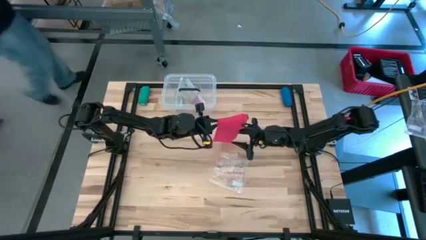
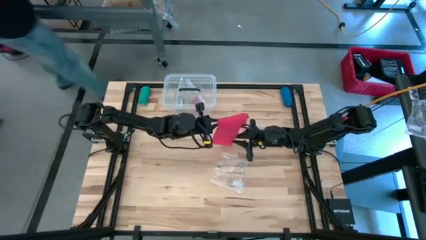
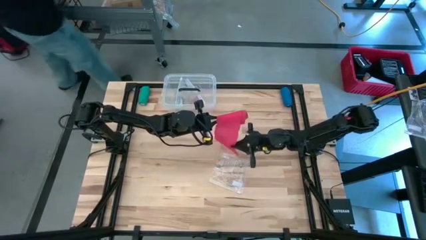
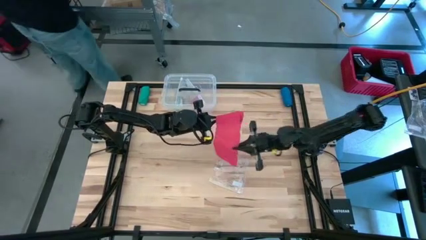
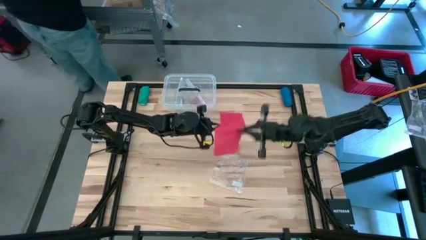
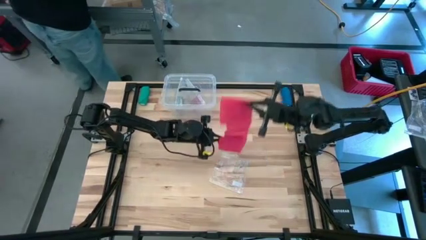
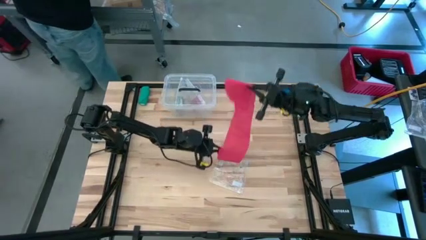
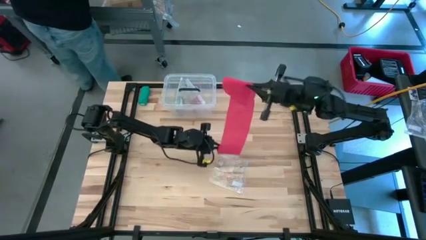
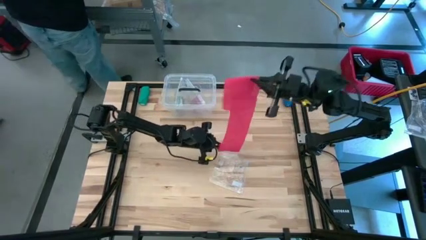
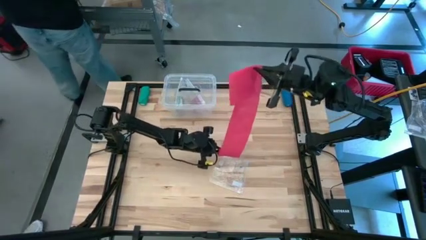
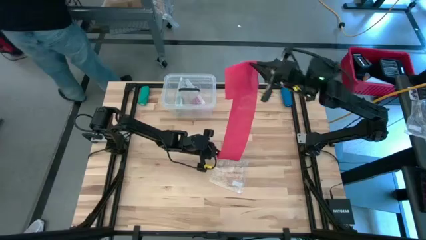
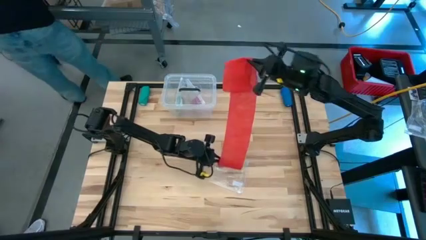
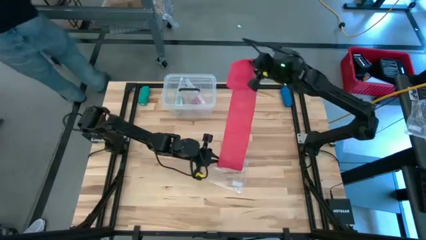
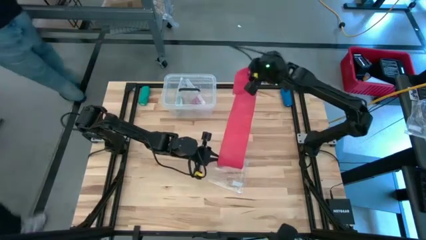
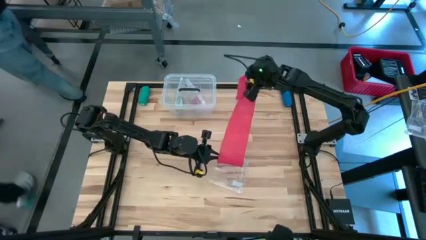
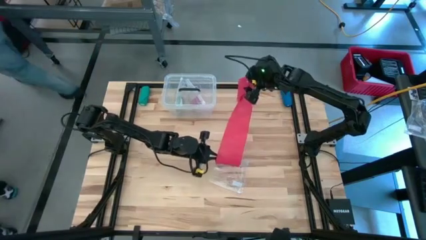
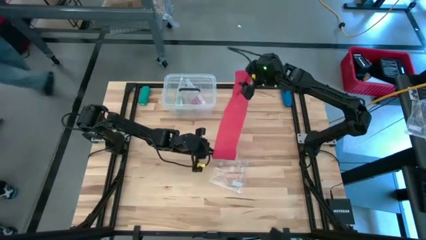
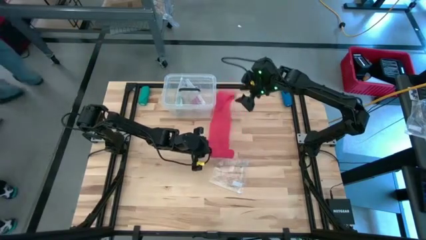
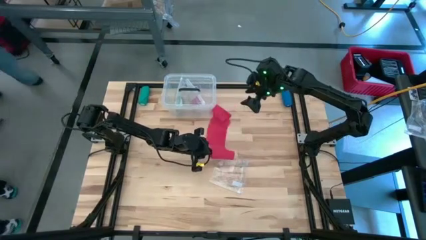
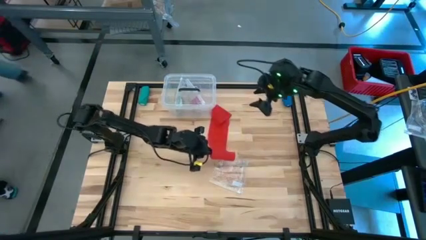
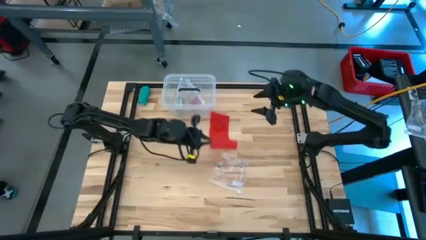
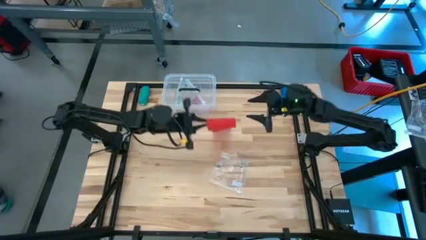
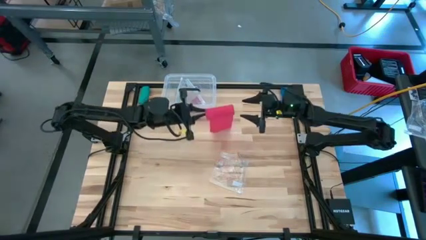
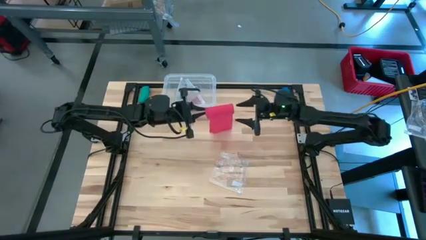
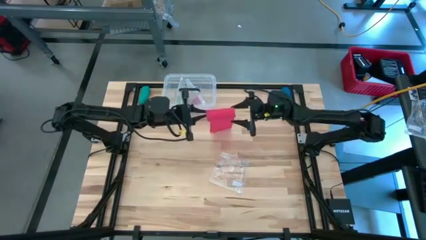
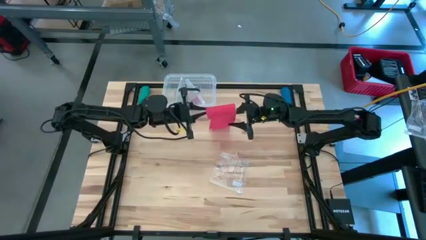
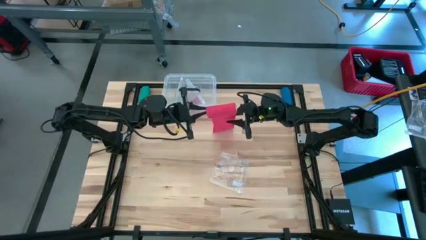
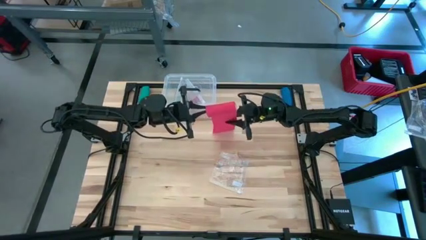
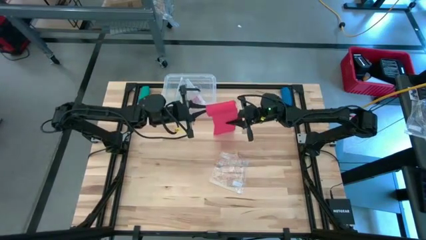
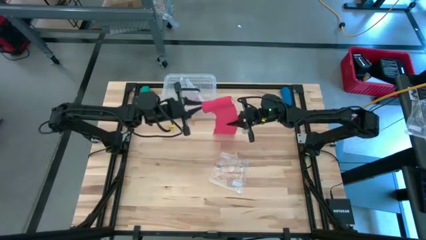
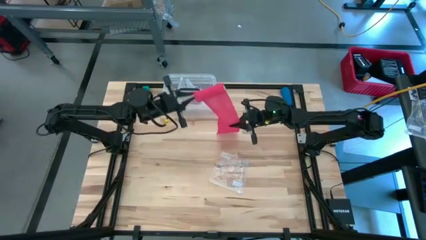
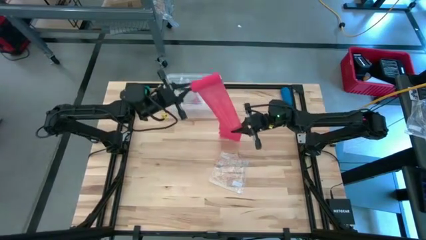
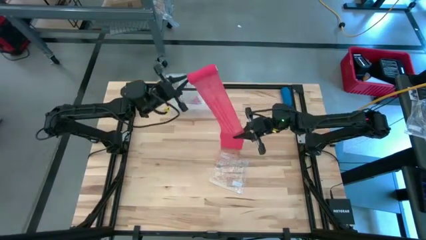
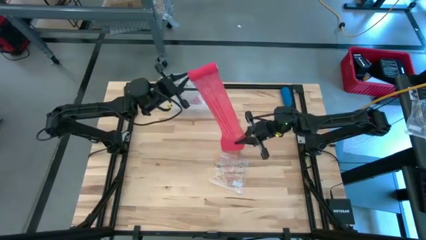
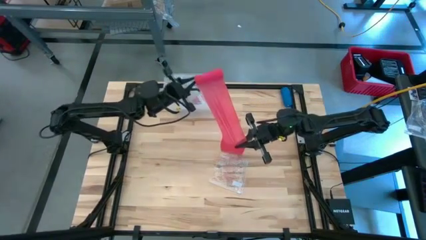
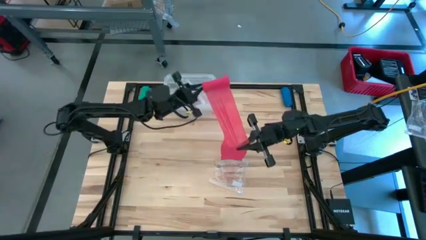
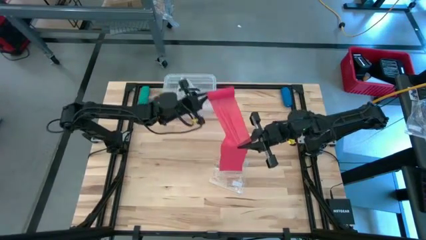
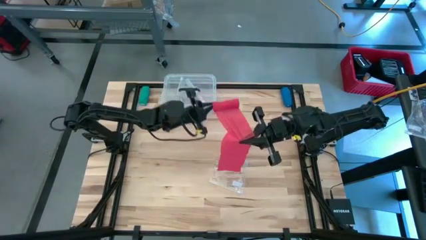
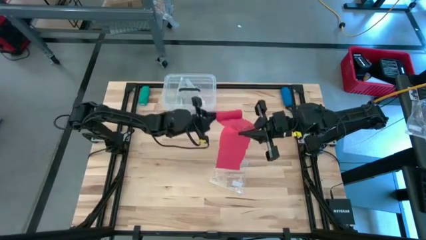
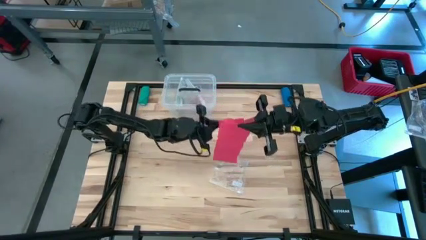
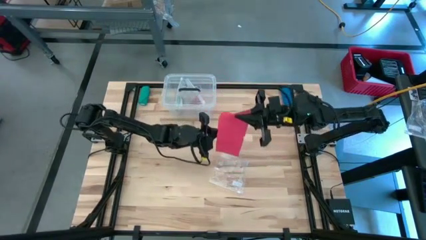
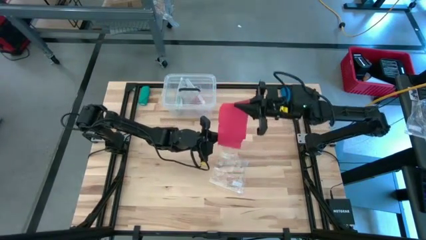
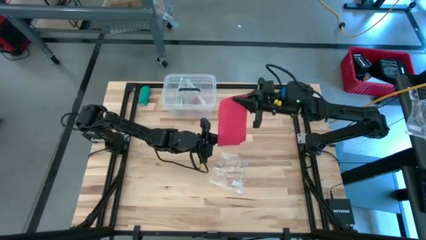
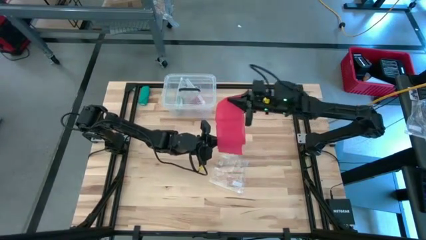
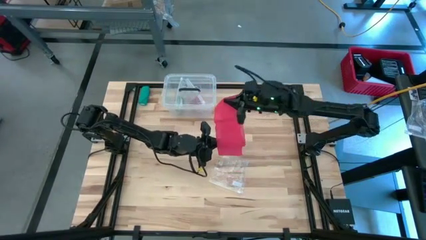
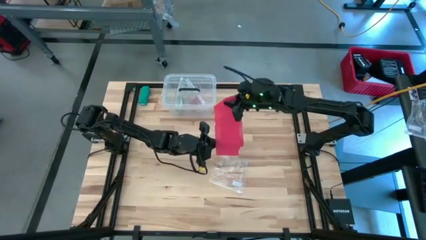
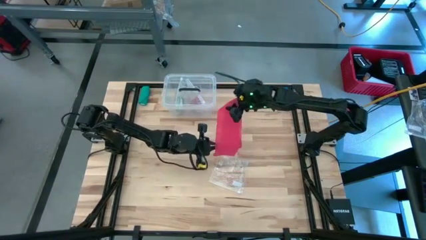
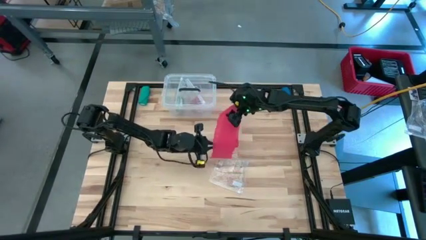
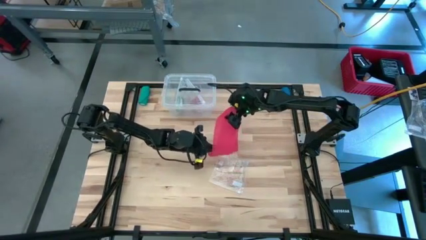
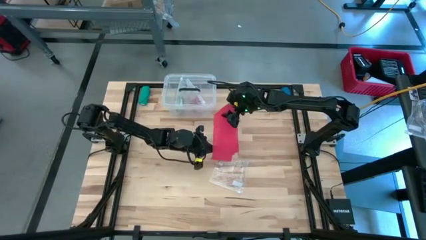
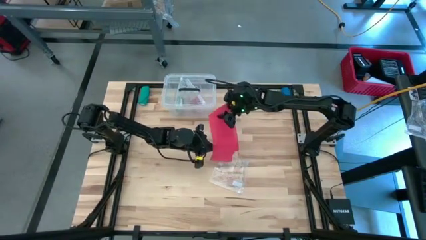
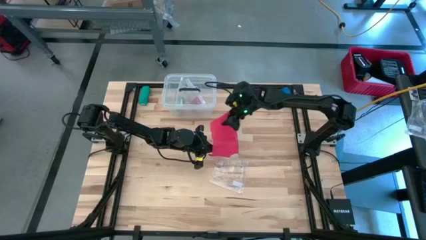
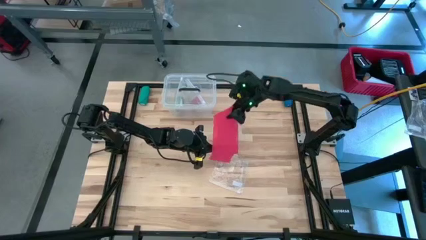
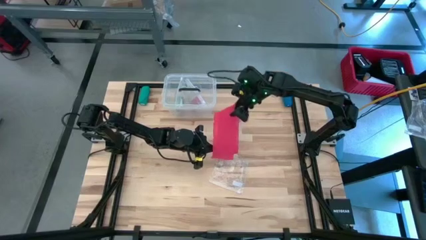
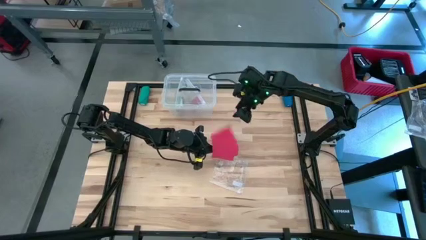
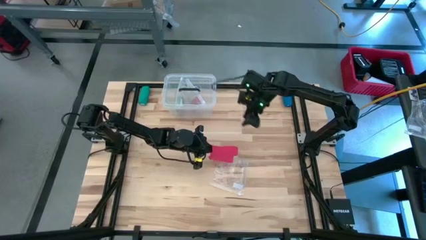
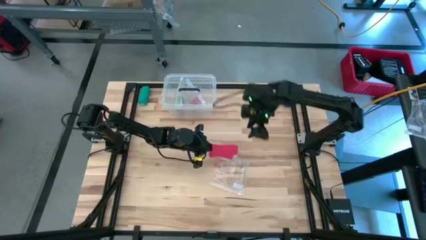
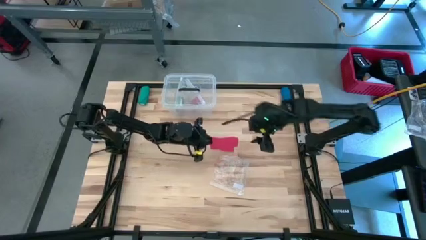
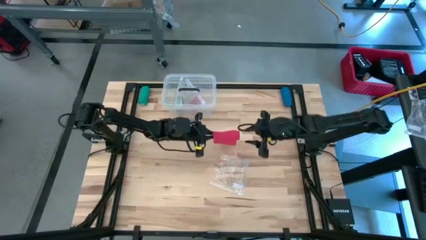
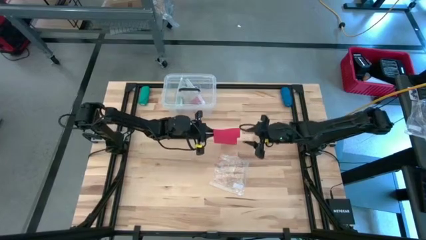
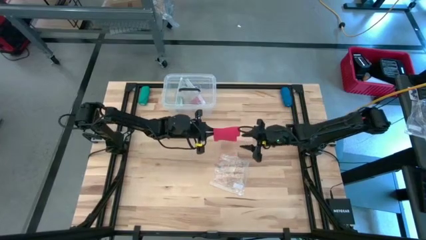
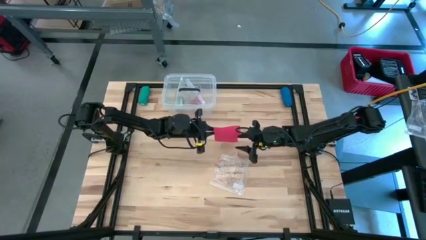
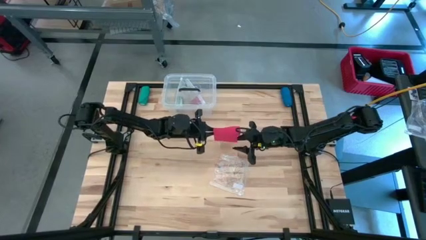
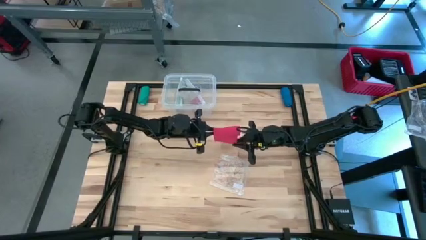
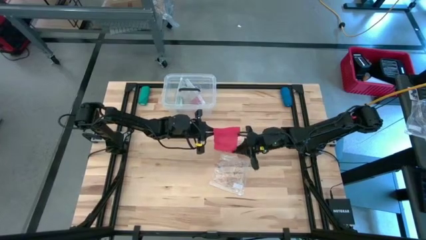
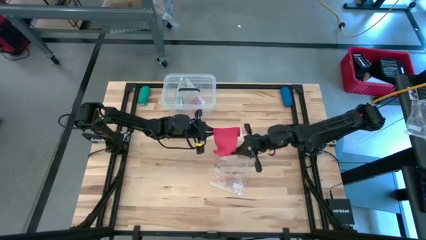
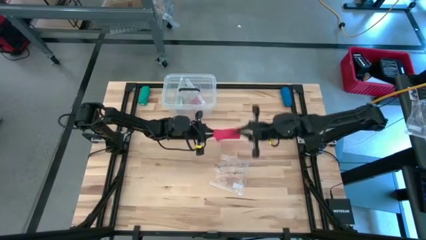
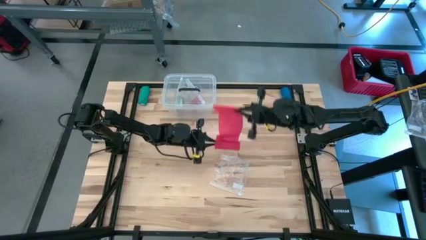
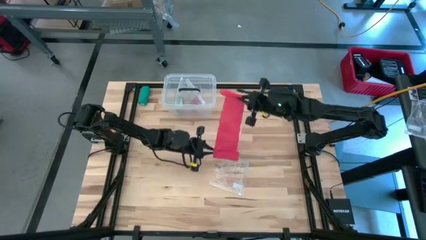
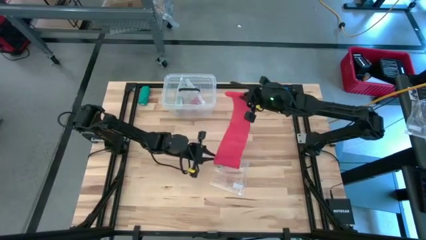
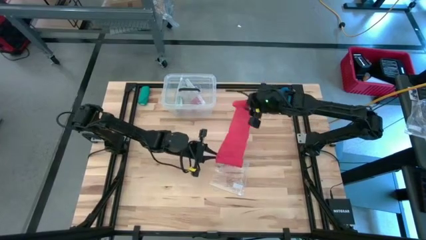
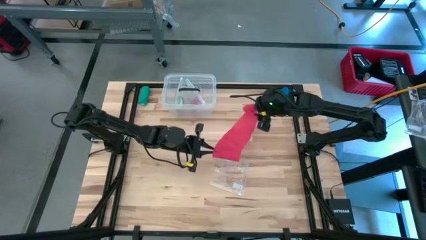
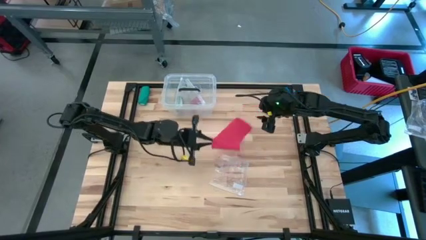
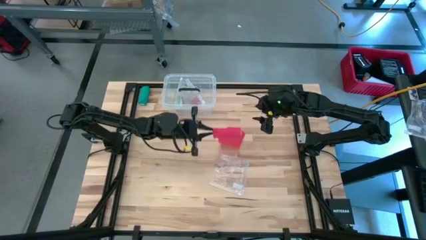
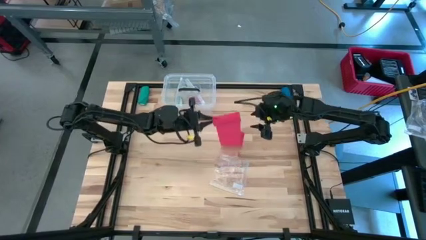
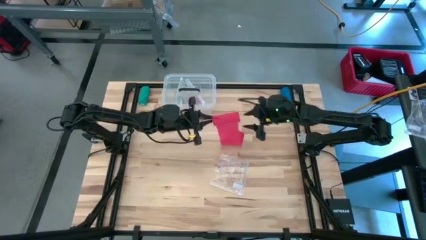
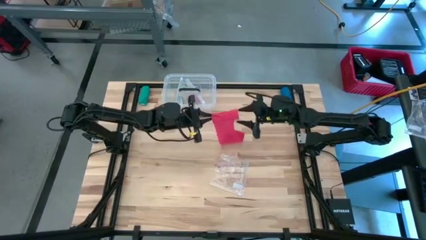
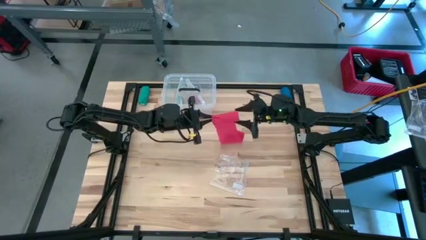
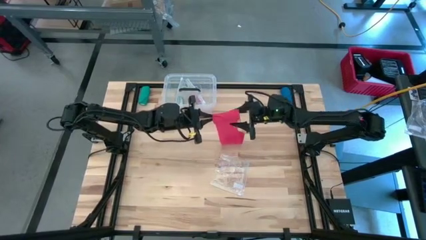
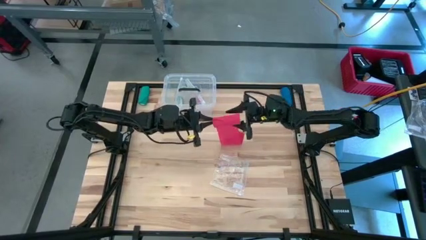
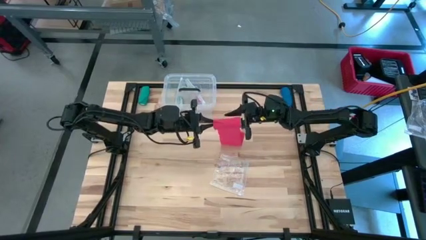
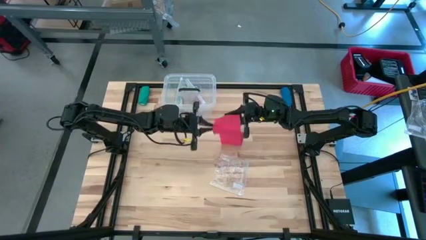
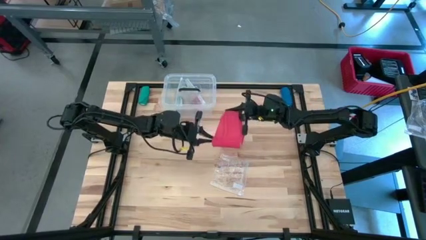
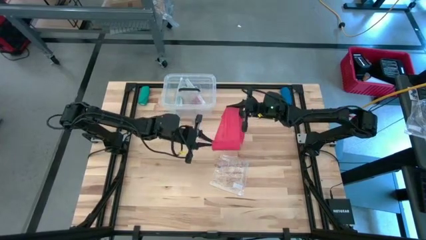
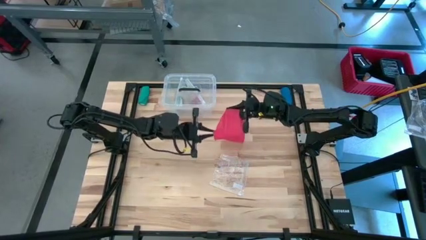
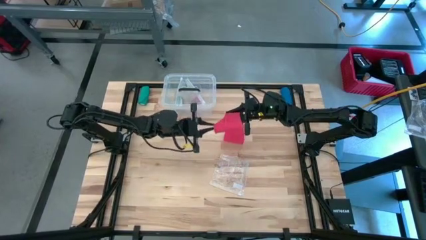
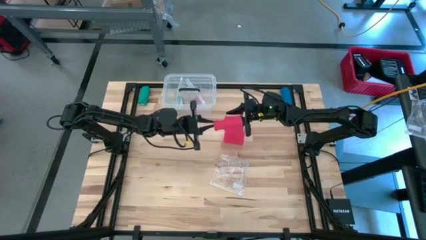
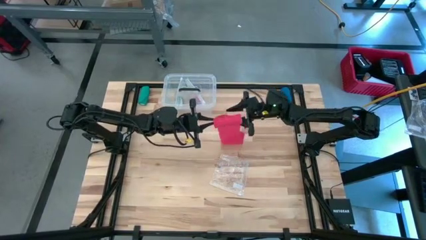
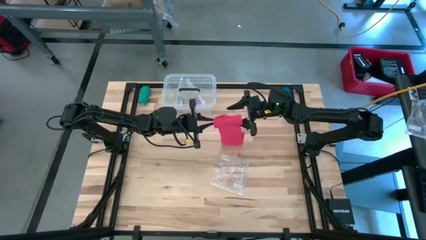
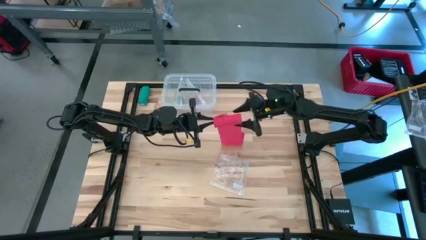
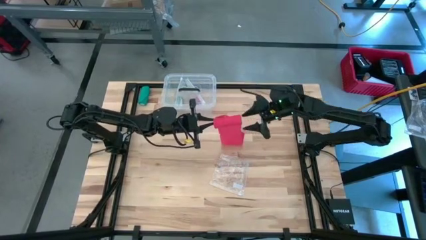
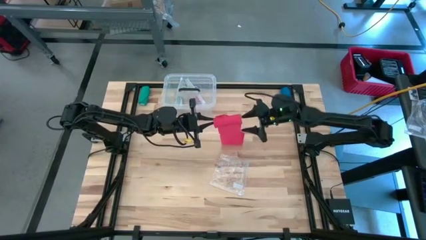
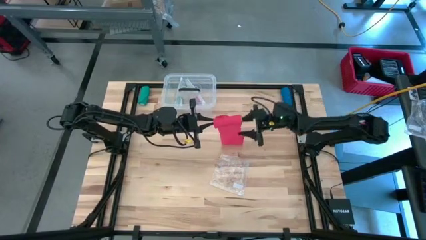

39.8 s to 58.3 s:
Task: Roll bandage
Roll the red bandage
